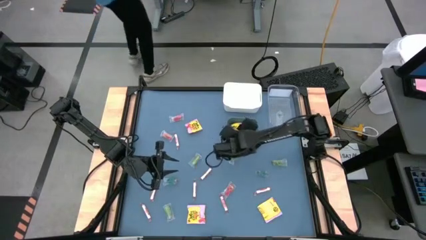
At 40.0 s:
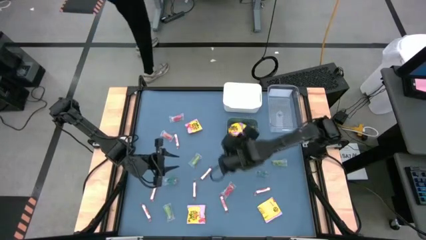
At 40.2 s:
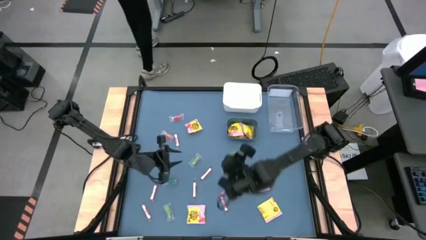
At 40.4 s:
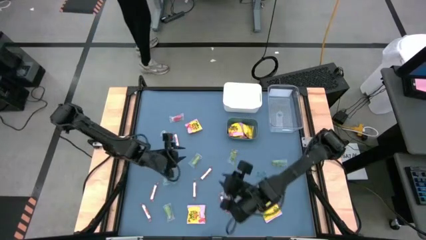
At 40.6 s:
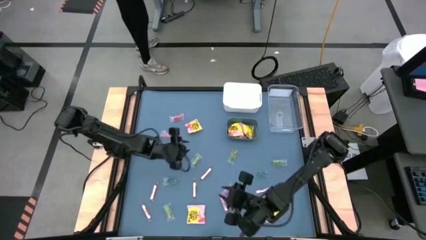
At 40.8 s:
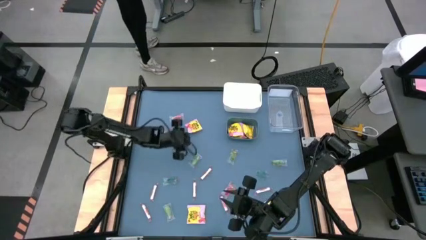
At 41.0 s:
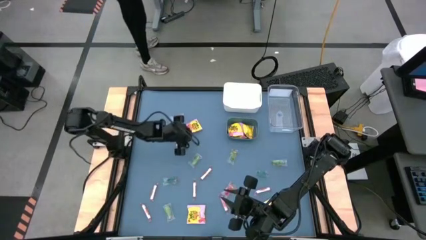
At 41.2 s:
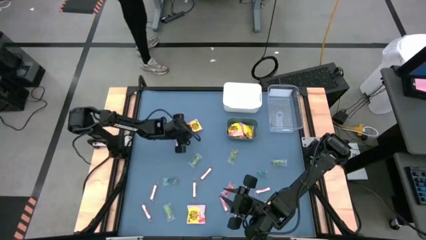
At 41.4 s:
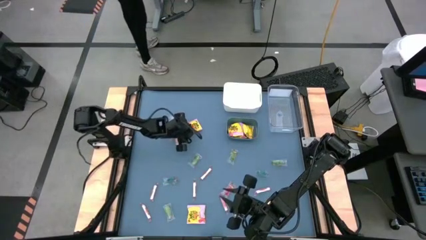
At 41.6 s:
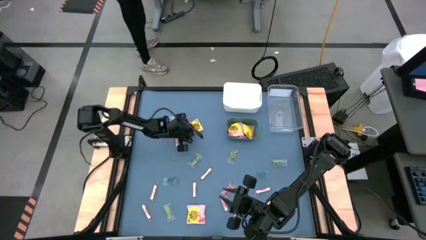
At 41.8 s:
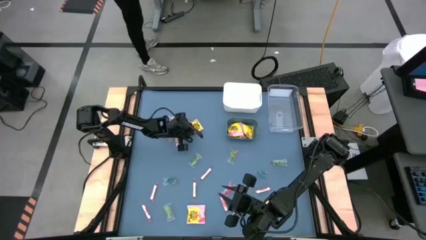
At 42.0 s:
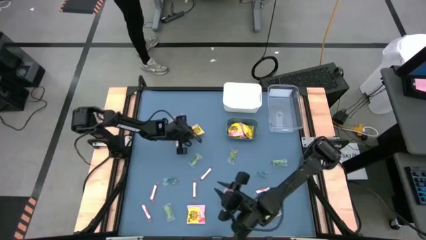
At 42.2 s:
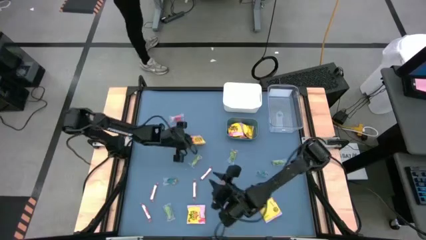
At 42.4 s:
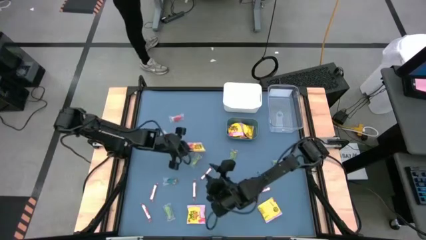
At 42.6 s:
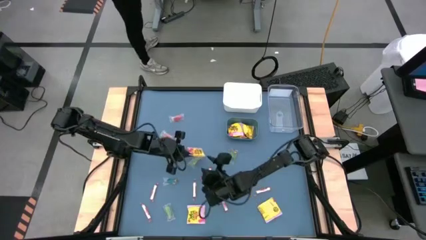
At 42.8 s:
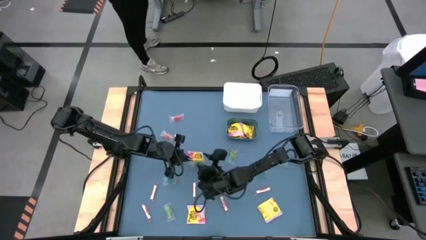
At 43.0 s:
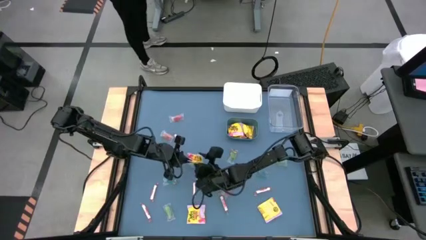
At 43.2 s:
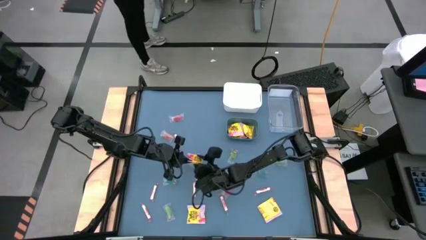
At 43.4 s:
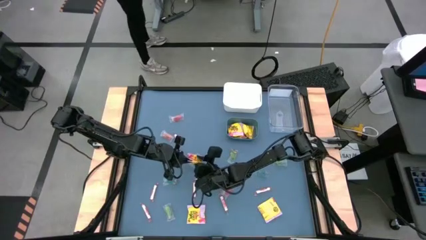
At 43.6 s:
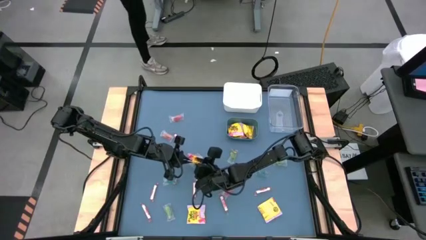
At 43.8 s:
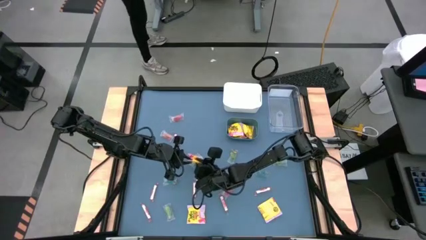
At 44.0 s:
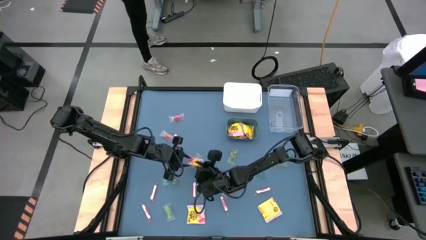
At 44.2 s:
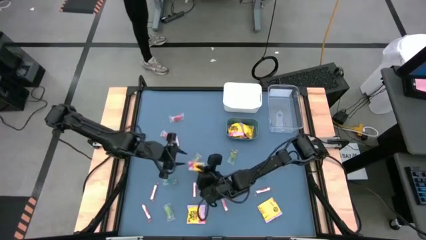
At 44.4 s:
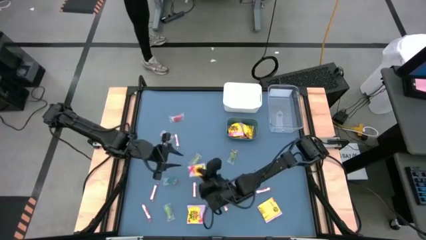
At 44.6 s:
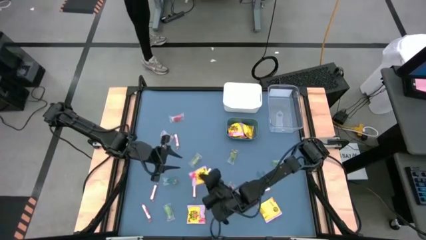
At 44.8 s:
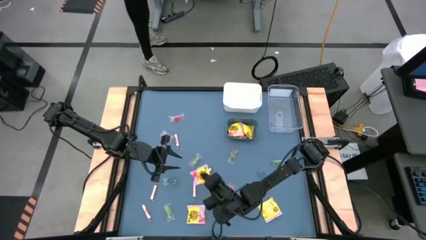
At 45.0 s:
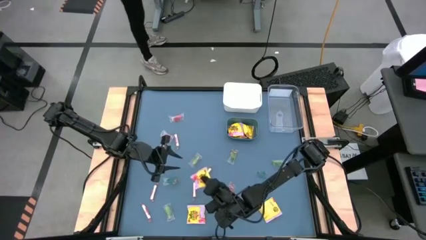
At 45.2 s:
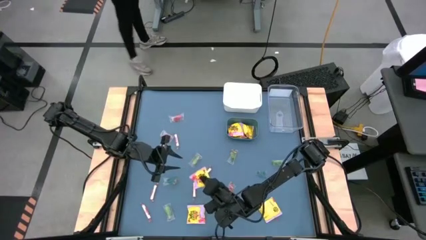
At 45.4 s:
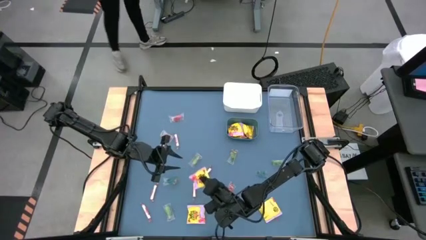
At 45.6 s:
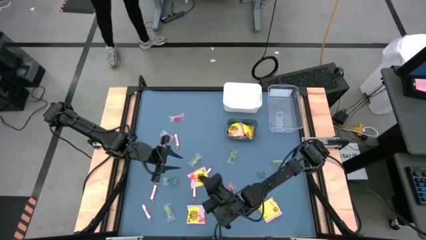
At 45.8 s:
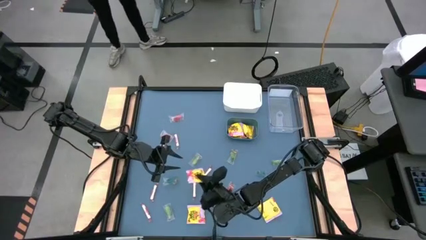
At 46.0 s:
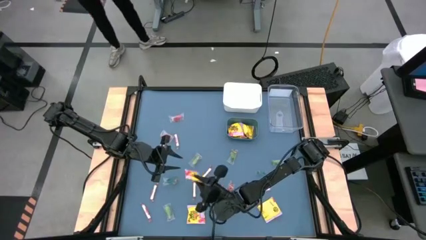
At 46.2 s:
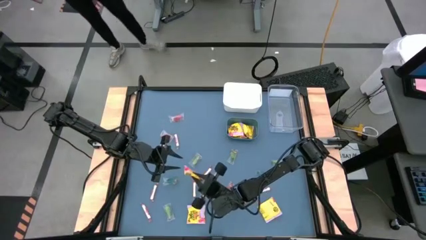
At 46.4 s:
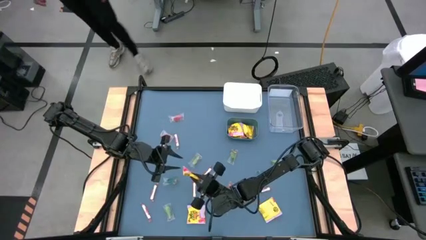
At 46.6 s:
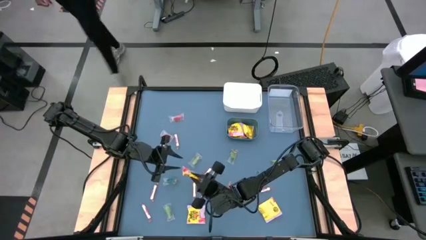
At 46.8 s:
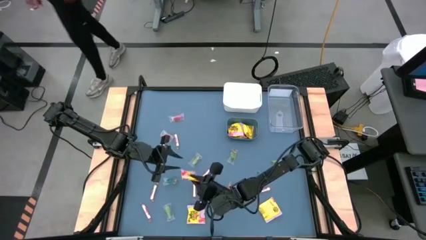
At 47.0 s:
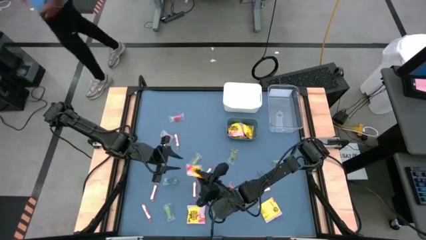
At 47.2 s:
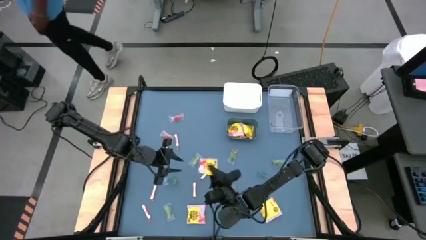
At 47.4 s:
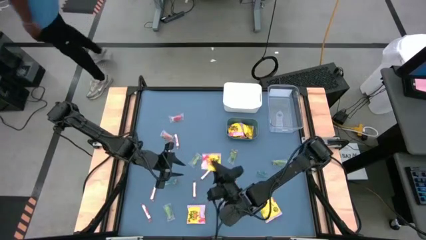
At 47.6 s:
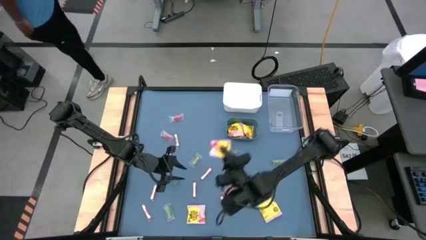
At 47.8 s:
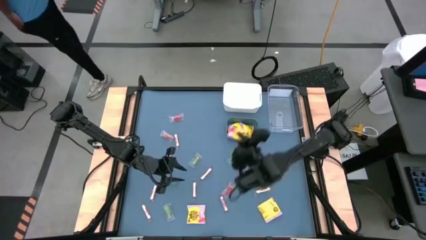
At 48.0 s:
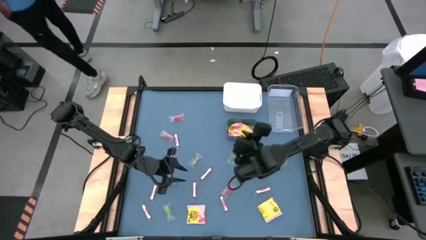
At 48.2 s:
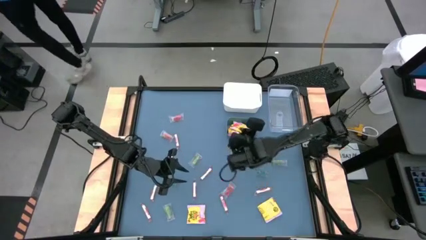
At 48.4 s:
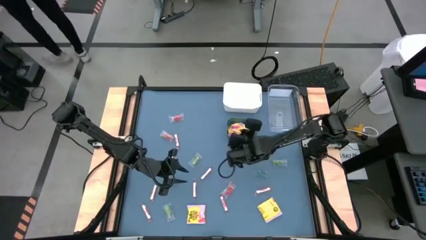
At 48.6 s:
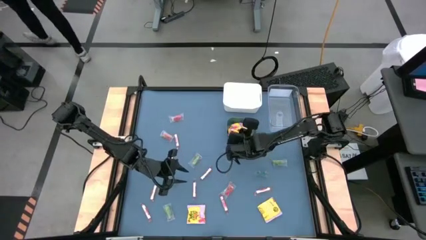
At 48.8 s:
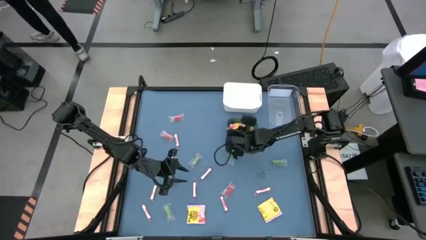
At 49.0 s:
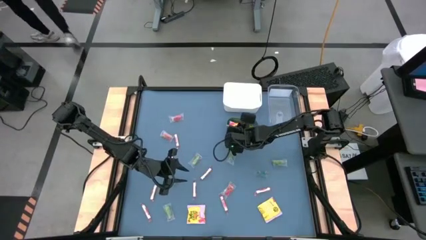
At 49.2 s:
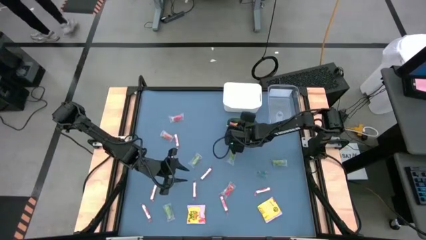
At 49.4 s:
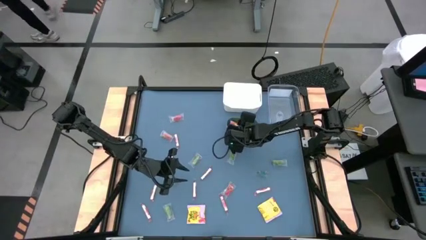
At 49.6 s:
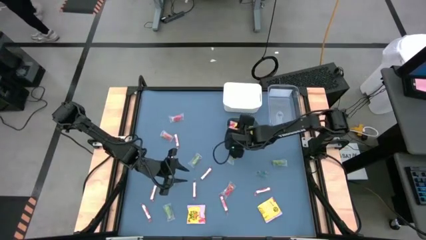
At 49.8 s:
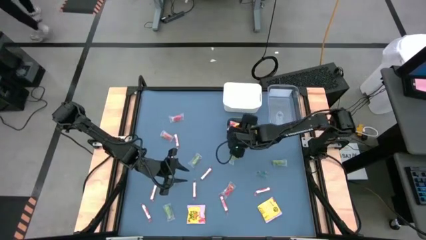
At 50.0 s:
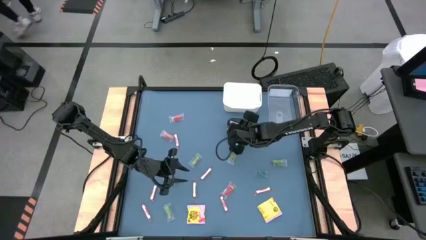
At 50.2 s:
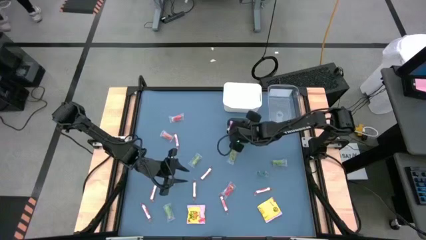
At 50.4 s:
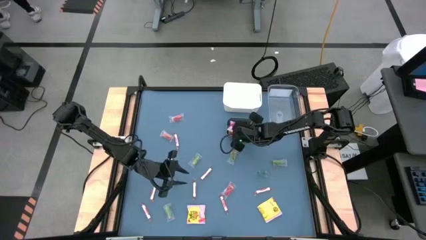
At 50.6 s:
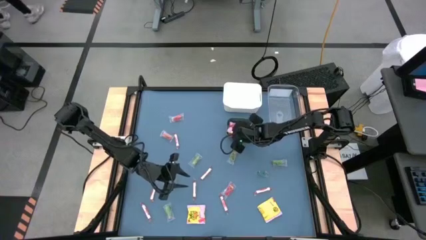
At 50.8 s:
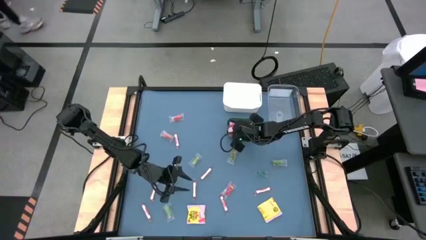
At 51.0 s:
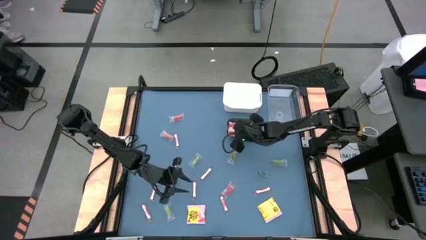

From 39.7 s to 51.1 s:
Task: Sort candy
Put the top center yellow candy into the green bin

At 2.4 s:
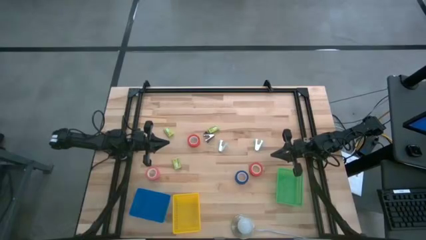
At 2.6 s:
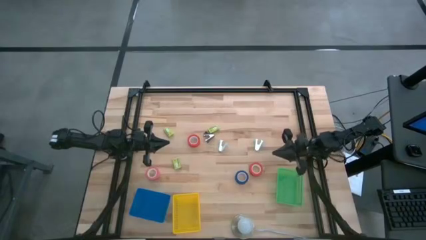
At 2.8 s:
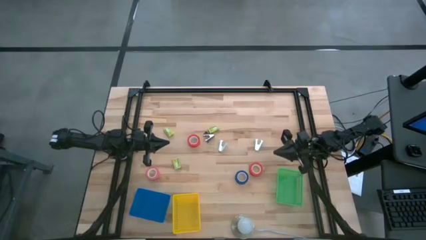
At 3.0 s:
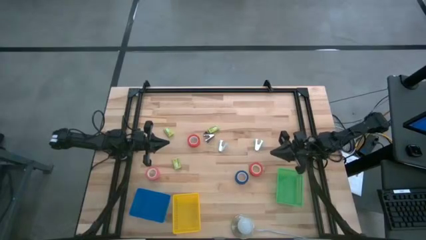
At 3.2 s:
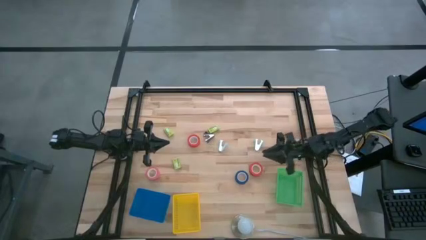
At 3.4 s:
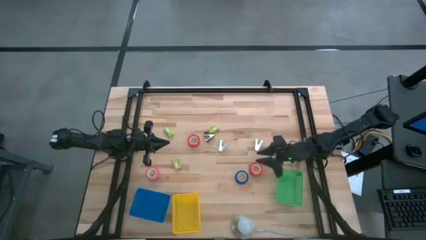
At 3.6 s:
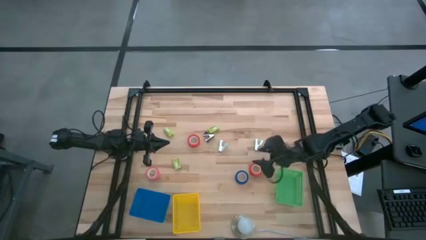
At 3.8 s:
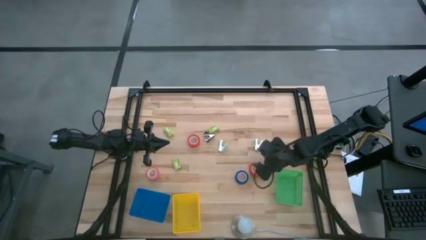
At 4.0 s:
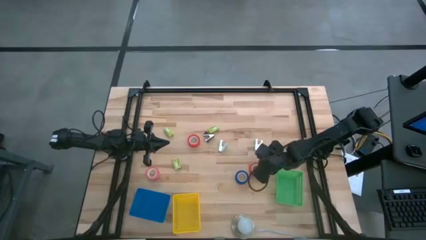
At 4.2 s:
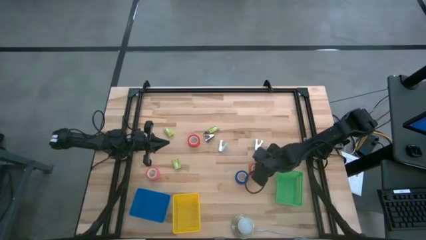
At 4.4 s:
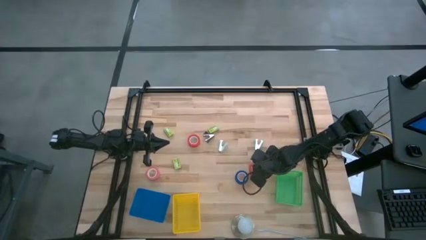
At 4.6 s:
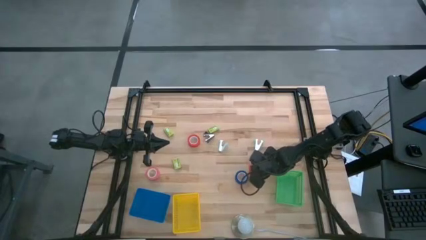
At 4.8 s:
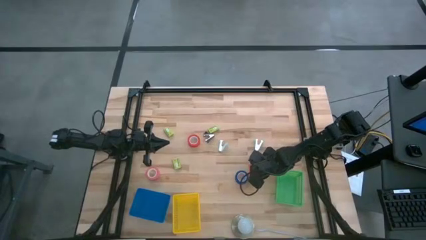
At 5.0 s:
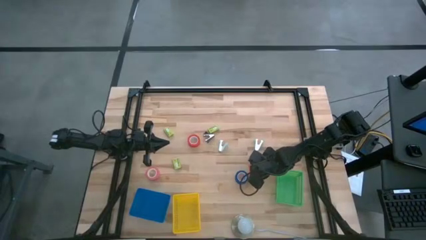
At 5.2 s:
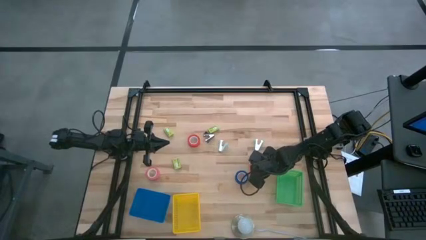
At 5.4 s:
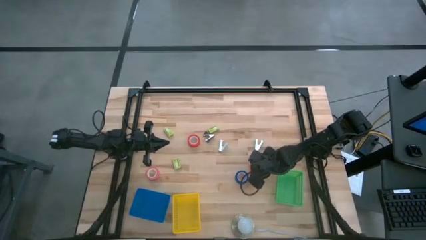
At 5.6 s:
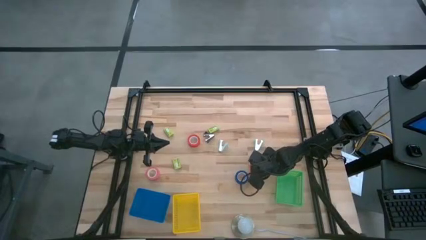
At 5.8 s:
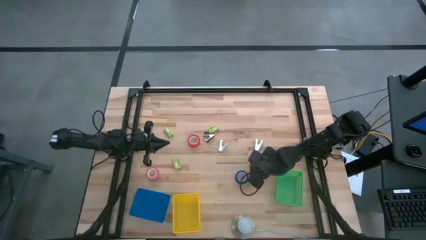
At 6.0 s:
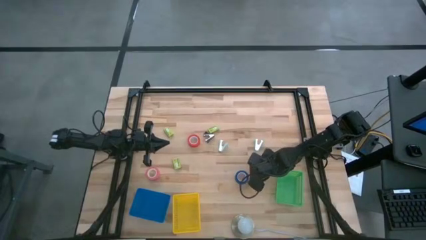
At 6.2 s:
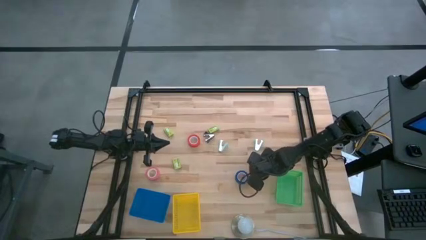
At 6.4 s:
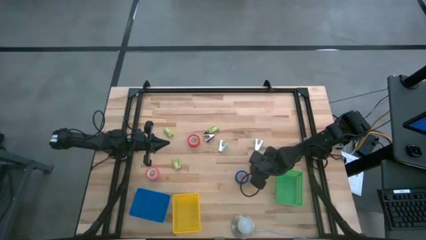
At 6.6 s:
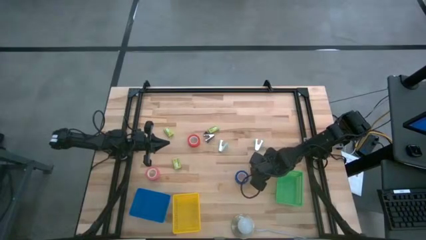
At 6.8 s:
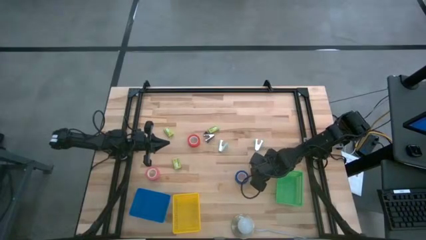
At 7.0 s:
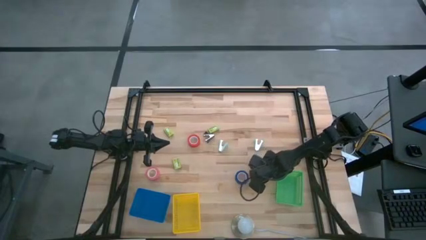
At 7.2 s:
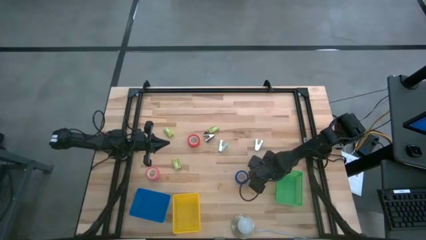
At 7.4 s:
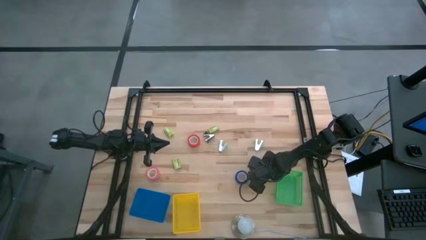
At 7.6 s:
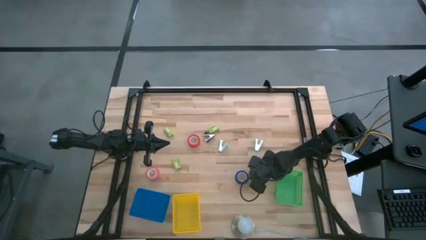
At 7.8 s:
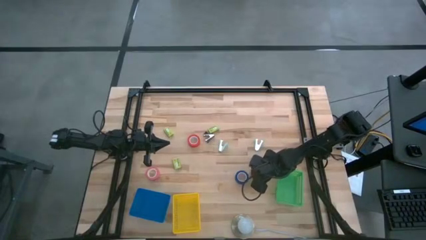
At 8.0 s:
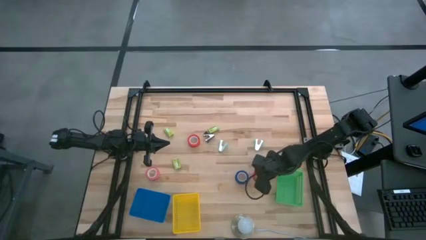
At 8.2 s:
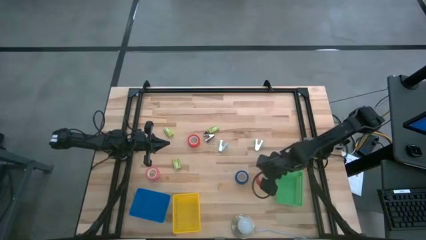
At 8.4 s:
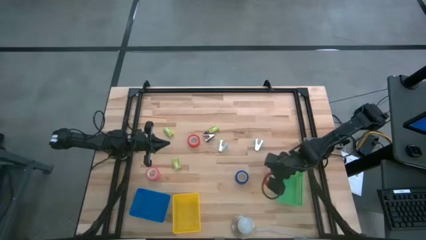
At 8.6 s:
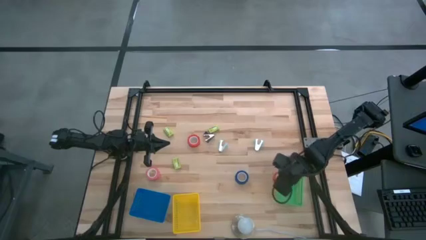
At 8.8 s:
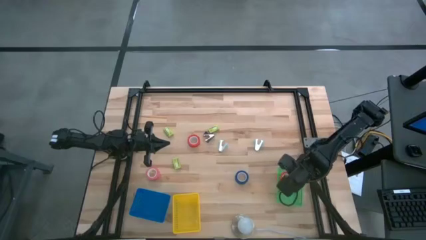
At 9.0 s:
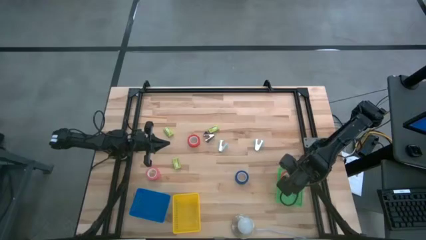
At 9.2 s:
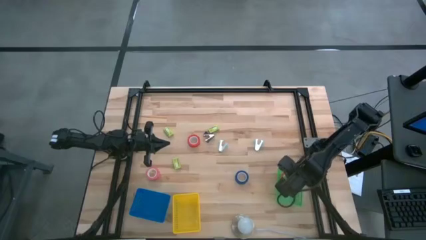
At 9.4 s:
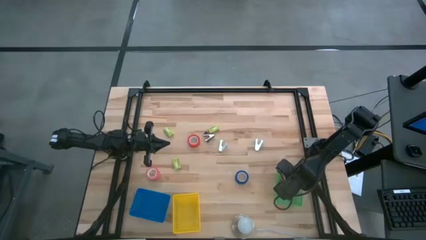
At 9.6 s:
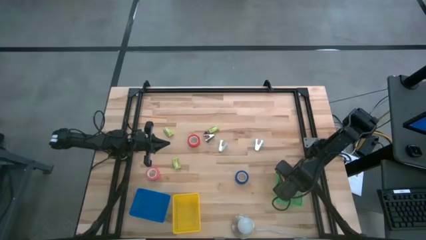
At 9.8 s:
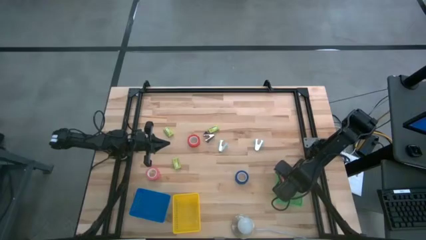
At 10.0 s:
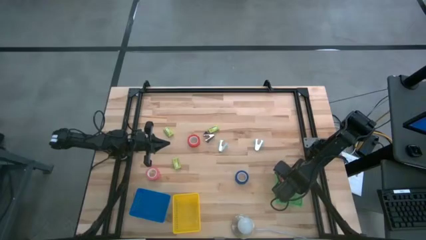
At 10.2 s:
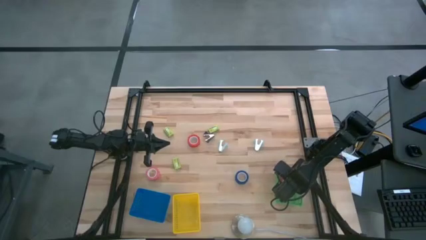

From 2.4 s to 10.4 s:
Task: Pick and place Stapler, Stapler remover, tape
Put the bottom orange tape into the green basket
